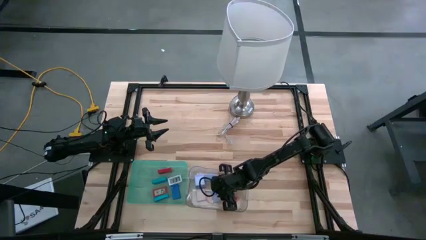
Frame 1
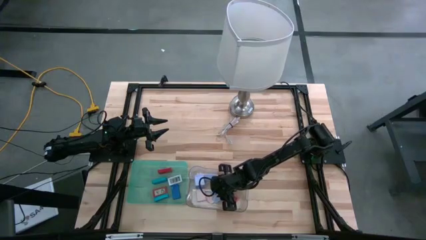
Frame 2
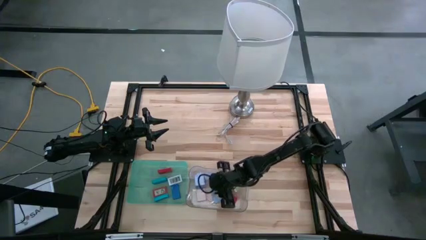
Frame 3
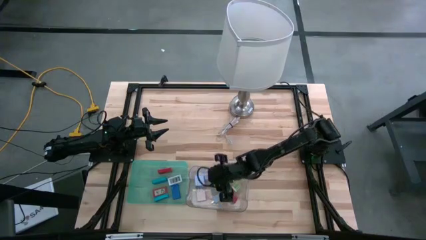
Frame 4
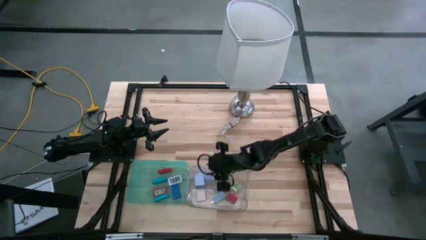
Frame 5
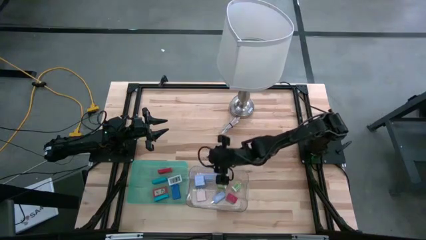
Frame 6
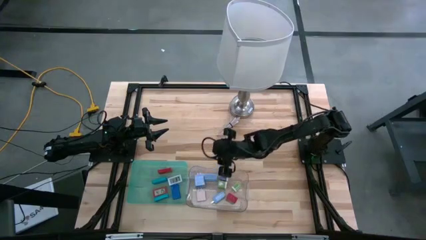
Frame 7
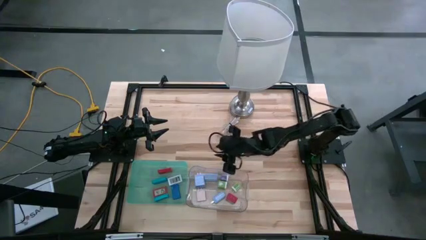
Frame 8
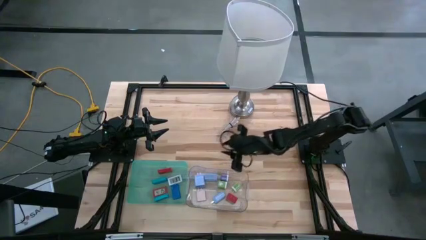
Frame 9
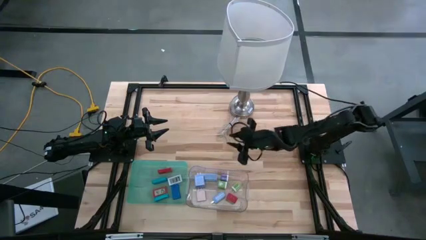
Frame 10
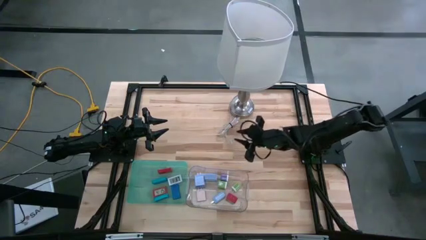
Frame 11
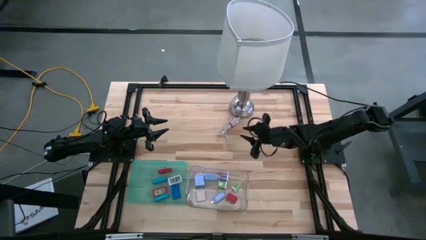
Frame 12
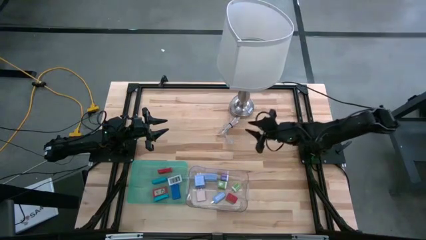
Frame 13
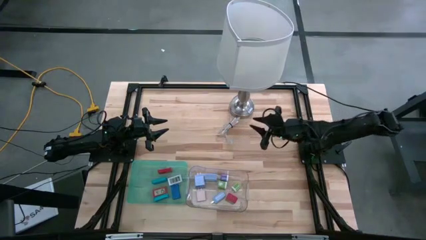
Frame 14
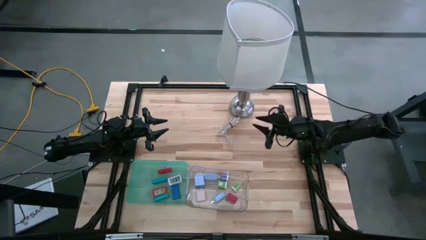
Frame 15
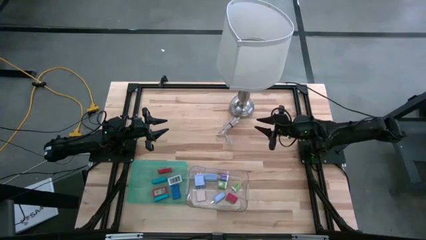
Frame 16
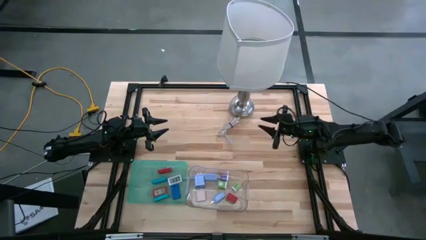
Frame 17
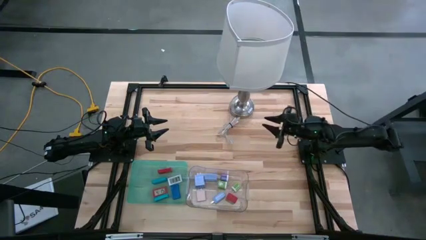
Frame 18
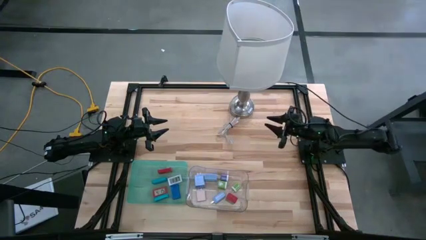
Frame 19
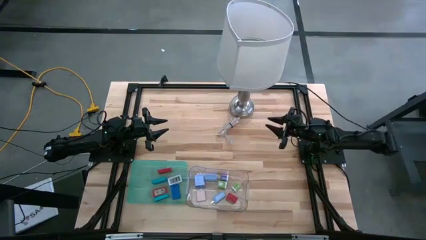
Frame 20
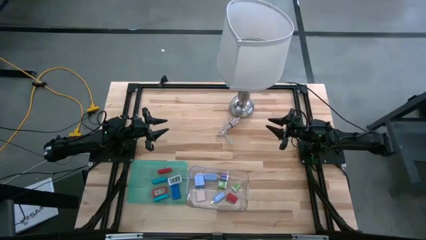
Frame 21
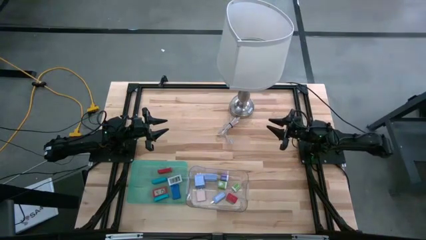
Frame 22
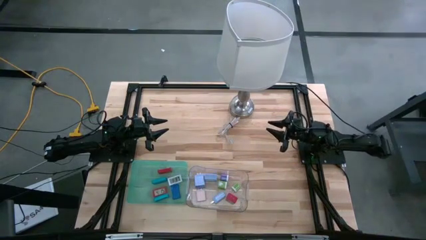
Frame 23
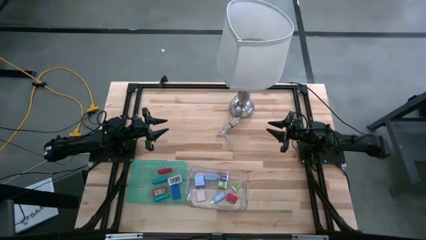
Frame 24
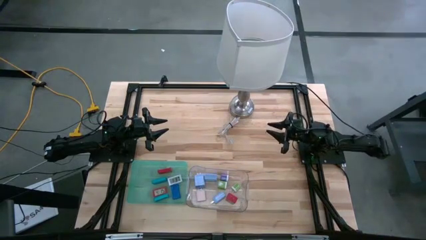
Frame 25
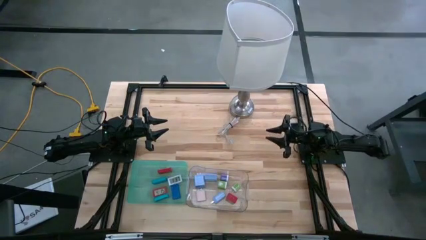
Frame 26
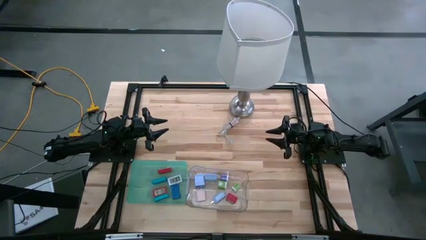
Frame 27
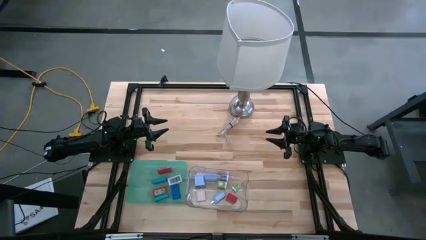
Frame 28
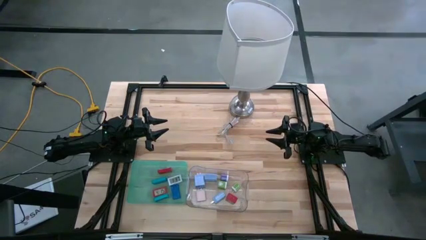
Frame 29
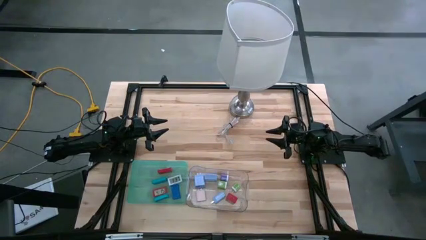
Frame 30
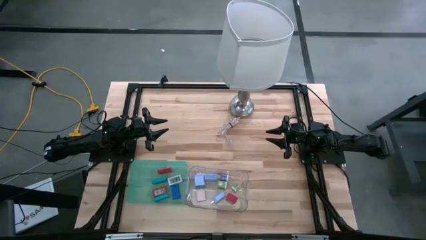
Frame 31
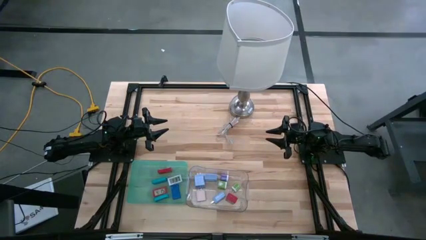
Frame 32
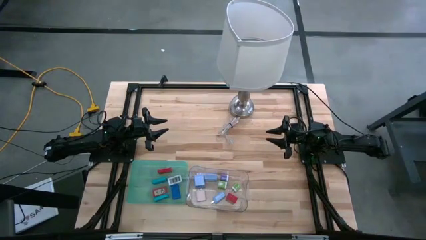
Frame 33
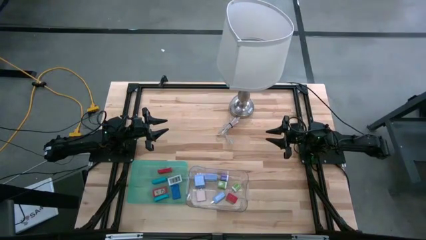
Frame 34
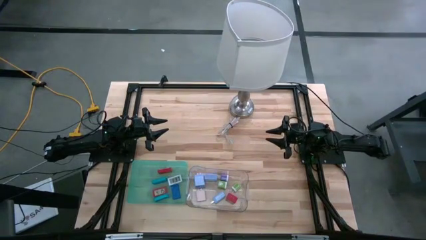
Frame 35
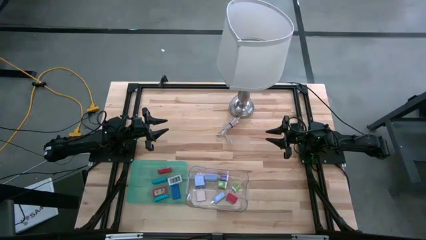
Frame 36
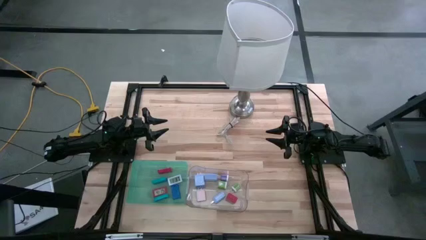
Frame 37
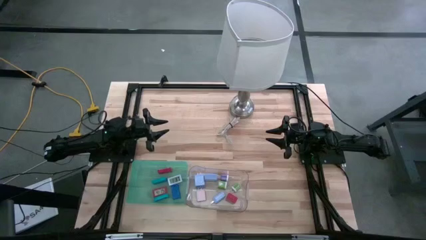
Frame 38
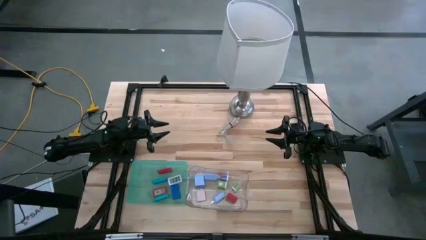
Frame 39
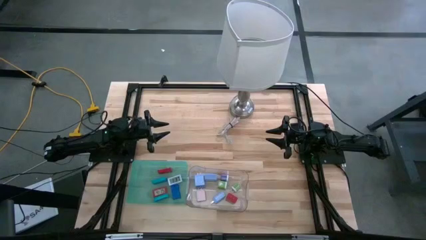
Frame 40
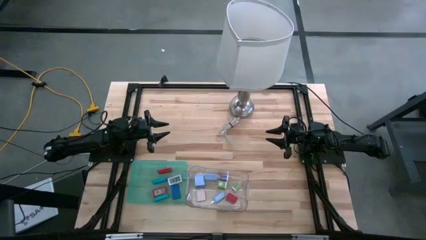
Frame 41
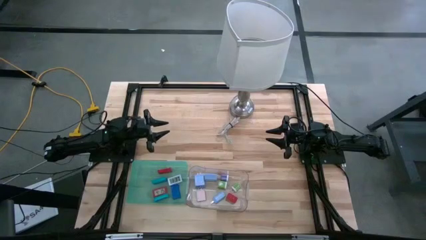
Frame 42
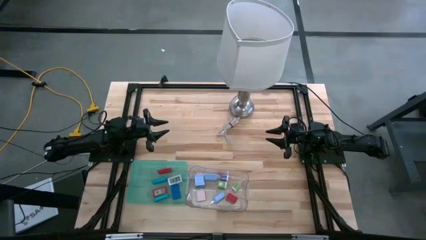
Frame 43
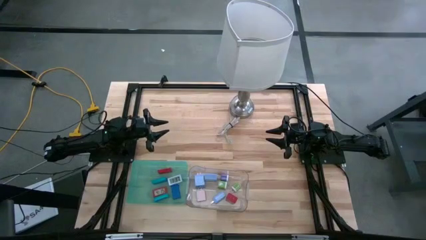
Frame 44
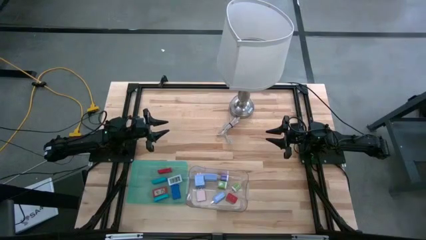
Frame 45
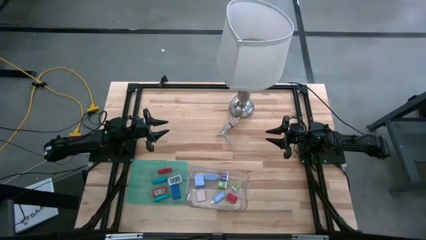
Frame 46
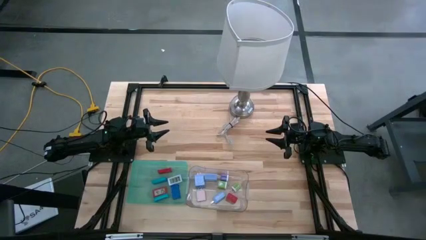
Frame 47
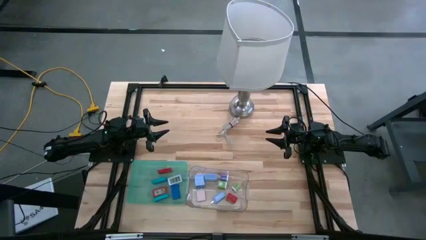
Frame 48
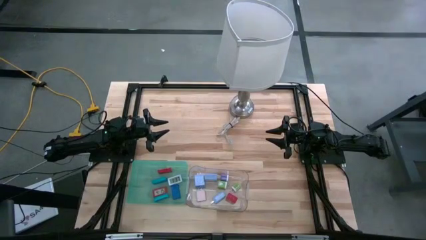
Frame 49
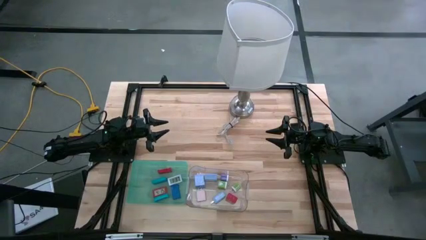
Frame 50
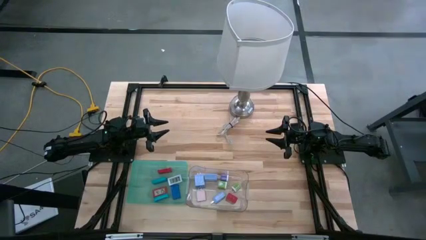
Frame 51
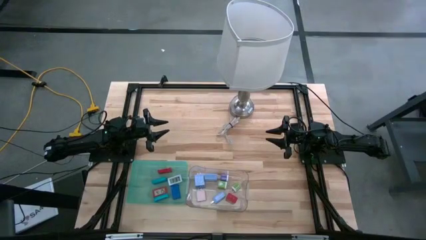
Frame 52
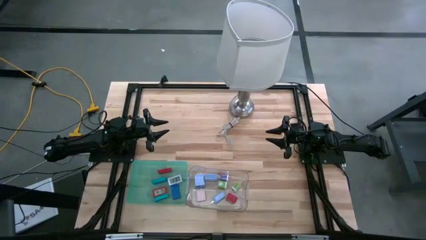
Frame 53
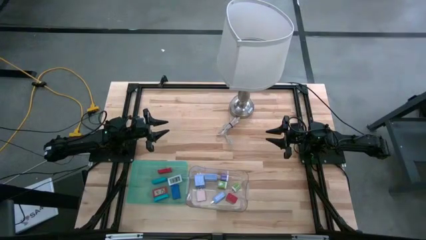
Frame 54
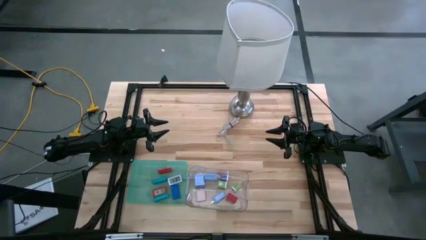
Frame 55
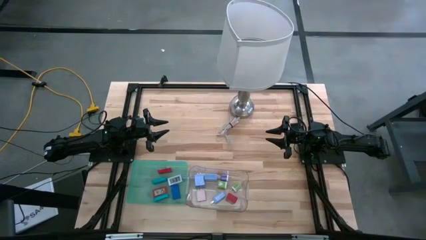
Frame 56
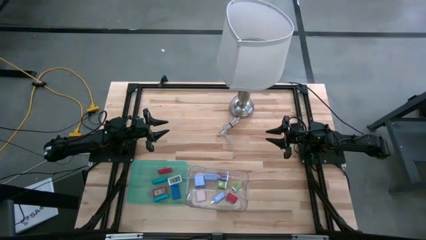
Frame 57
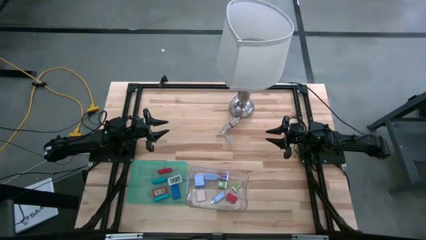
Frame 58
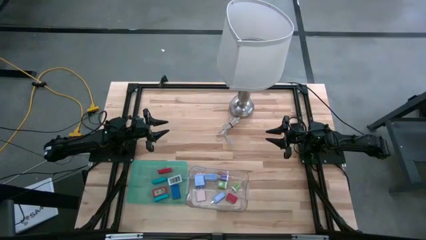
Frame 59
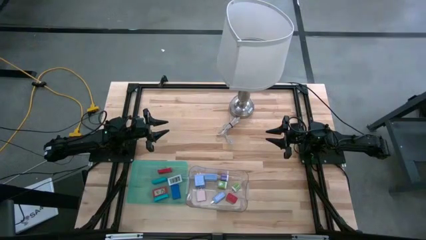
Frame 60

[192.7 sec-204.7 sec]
Task: Pick & Place Office items
Return to Home Position

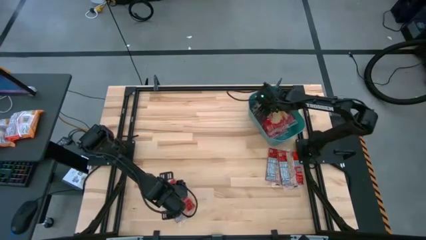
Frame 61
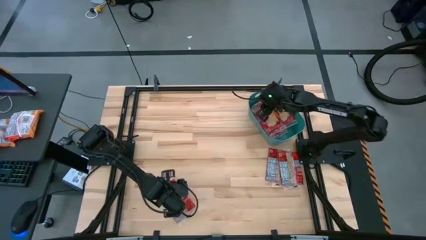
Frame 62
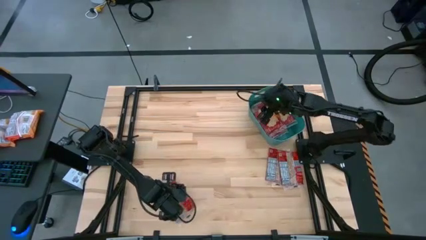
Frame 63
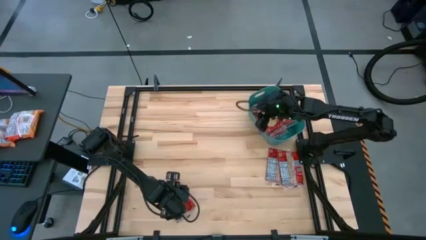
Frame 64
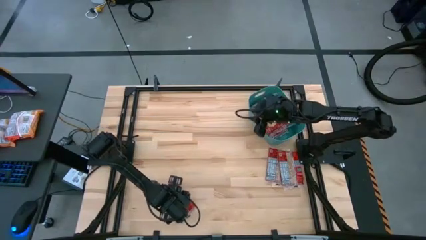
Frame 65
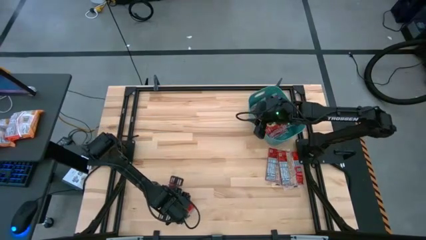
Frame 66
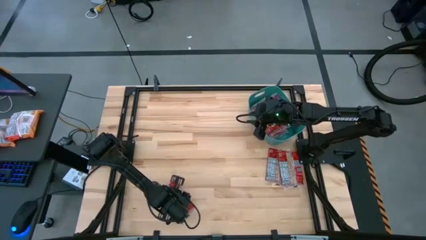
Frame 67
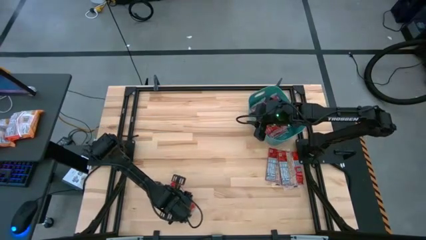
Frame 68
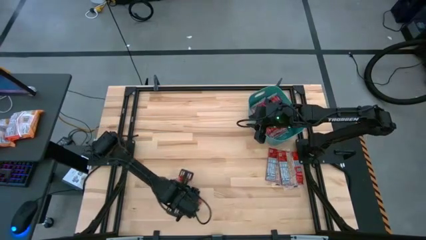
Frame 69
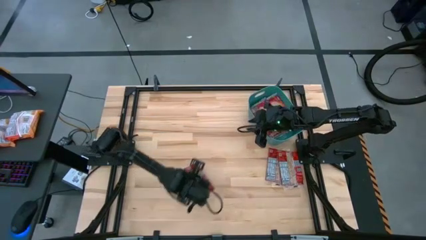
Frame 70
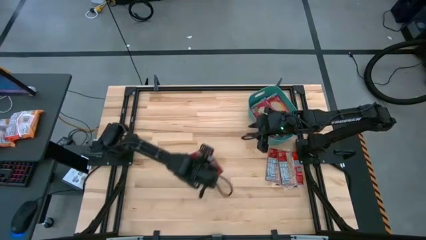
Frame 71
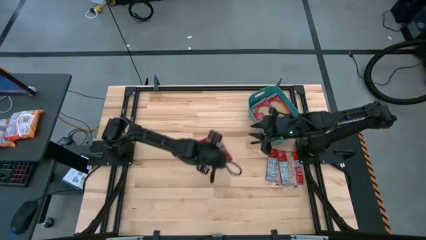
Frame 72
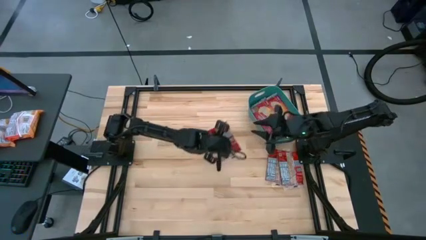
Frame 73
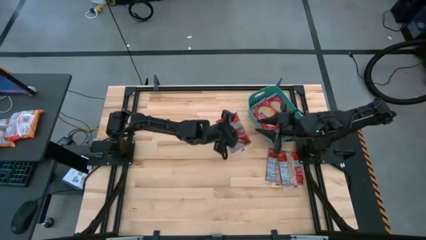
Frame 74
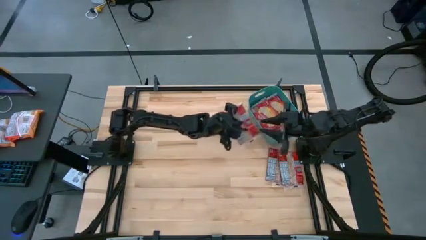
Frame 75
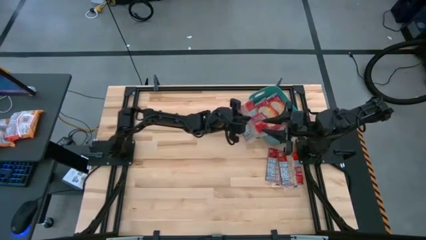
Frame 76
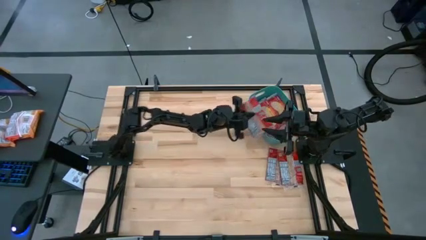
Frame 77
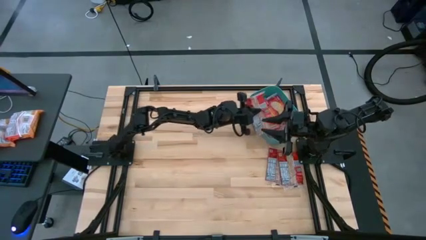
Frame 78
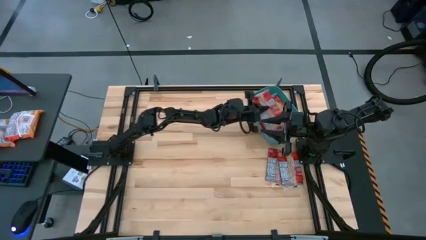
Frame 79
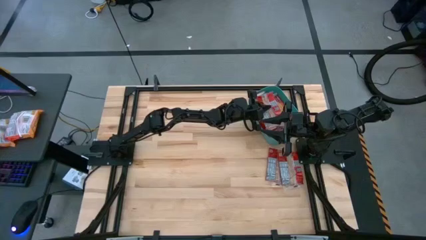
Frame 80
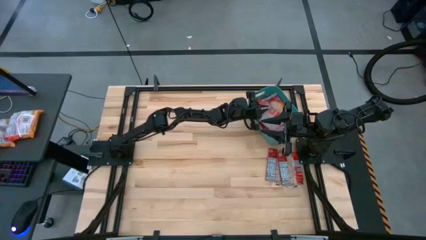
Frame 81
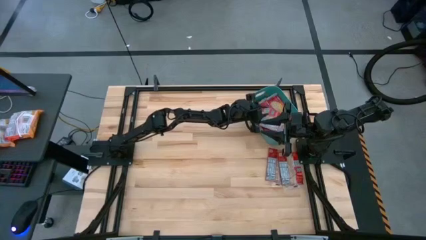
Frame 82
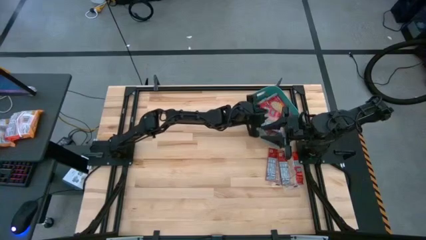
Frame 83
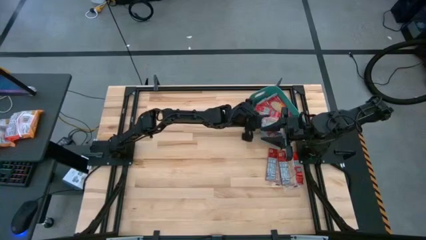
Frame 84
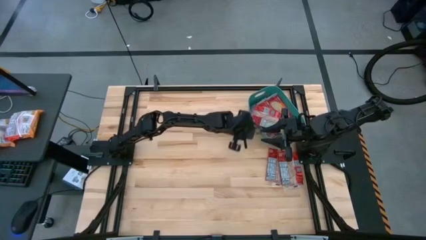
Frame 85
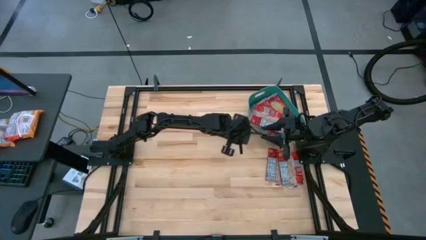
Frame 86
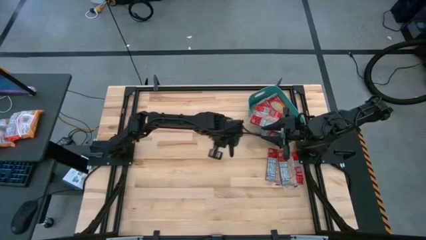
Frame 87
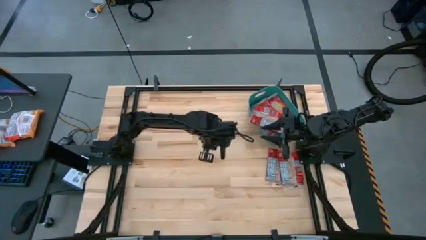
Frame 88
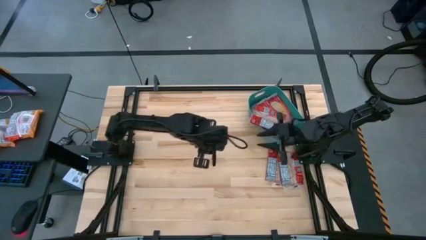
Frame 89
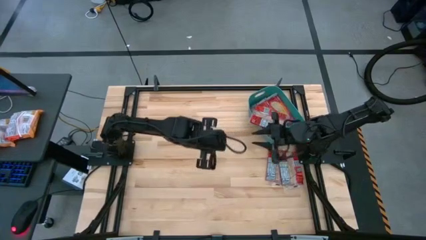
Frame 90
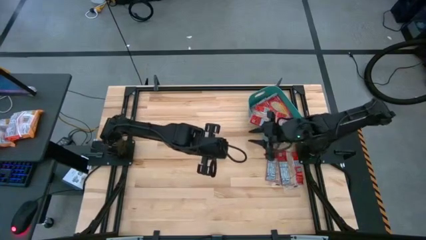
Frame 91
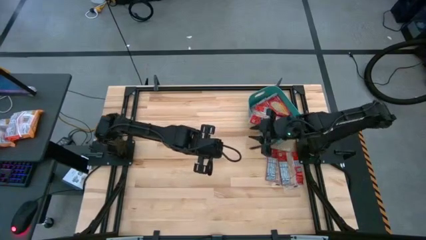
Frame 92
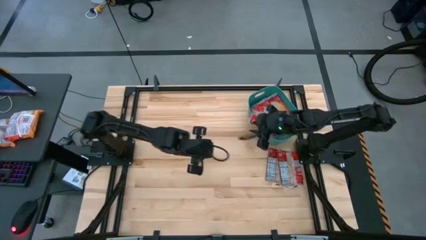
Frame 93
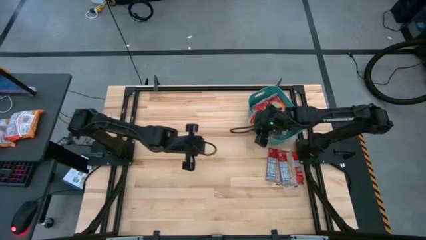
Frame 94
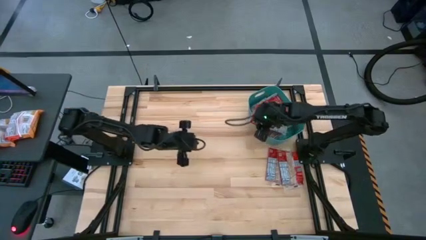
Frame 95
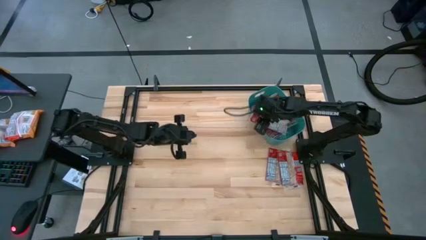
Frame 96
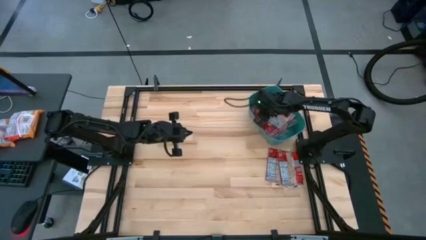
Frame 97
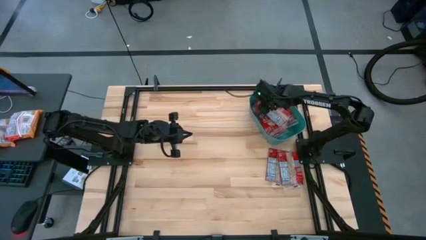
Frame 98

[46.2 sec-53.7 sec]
Task: Sort popcorn bags into baskets
Put the red popcorn bag into the green bin
